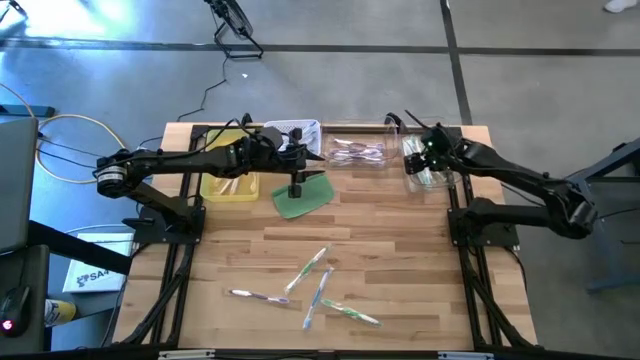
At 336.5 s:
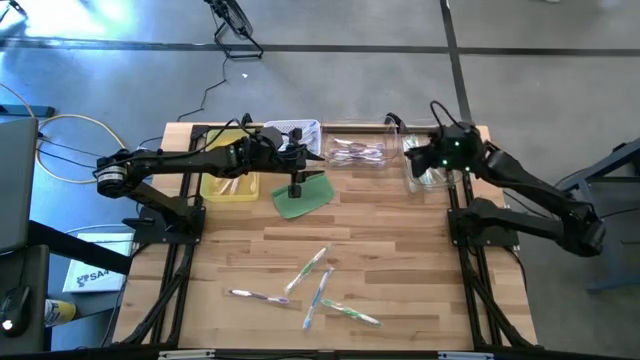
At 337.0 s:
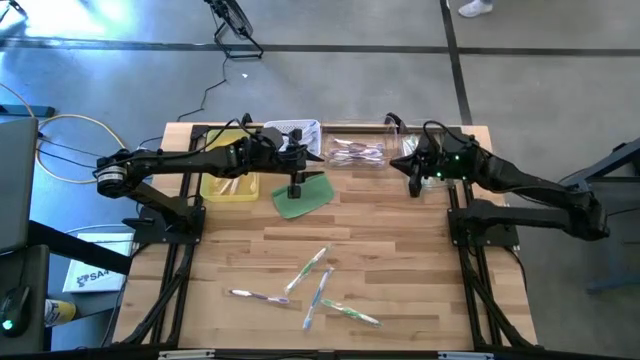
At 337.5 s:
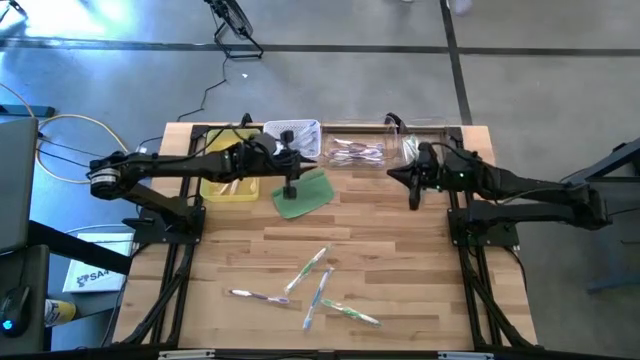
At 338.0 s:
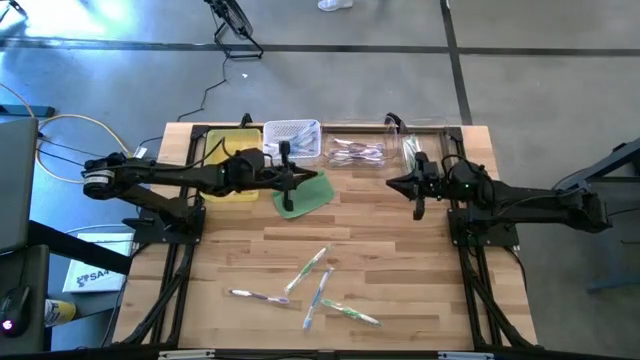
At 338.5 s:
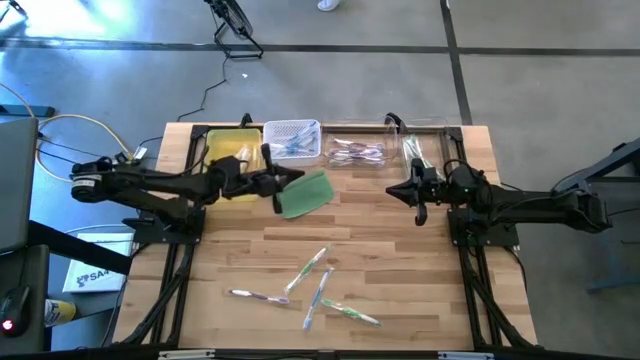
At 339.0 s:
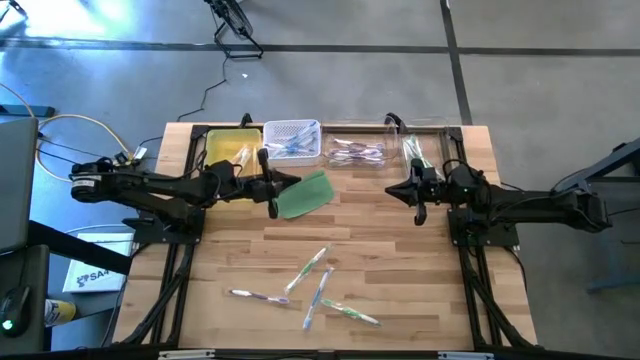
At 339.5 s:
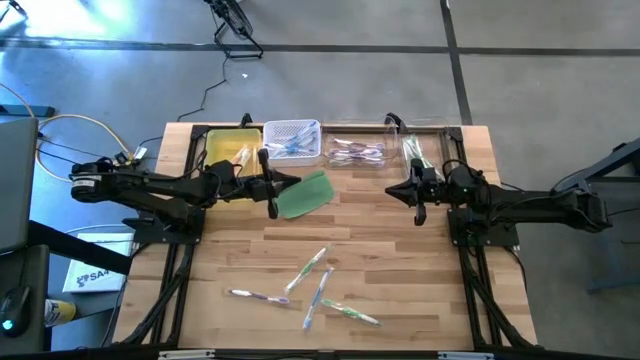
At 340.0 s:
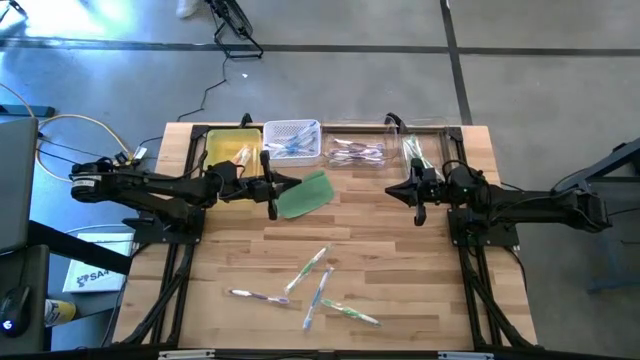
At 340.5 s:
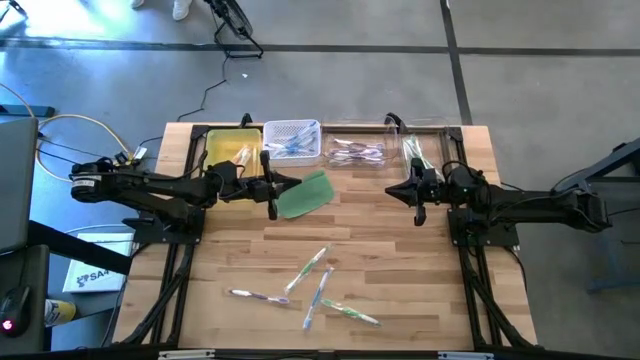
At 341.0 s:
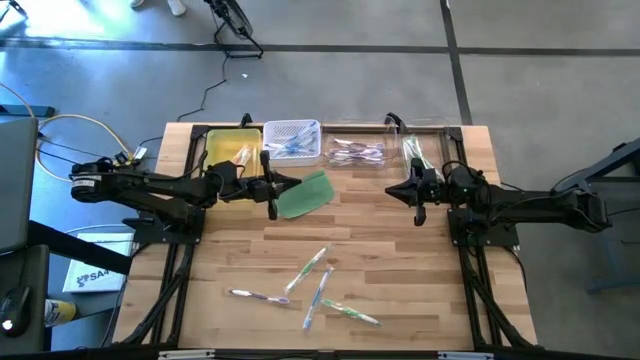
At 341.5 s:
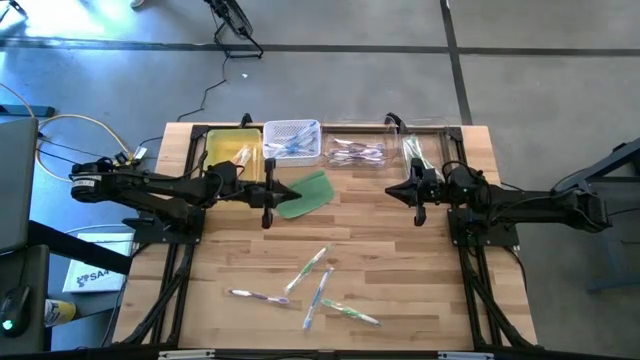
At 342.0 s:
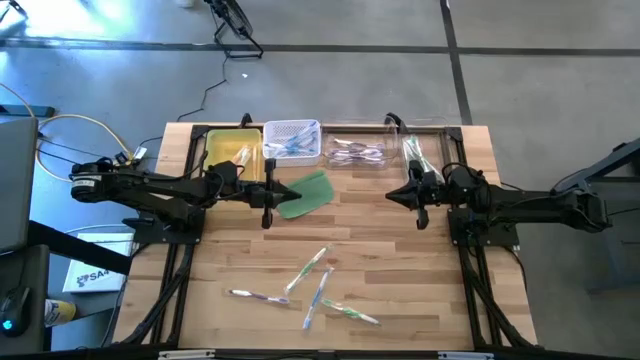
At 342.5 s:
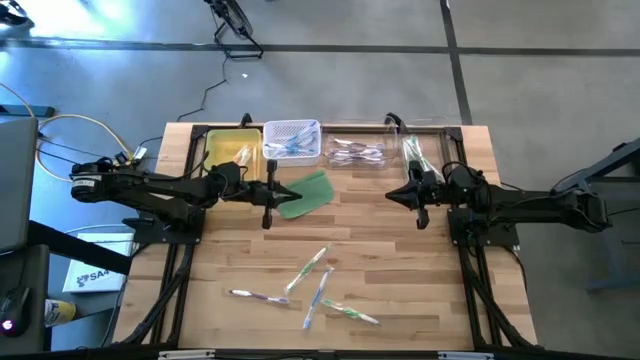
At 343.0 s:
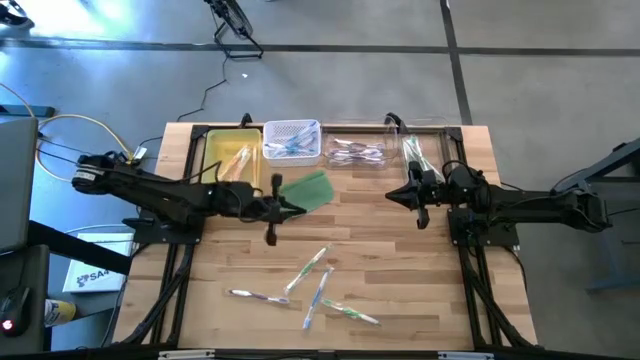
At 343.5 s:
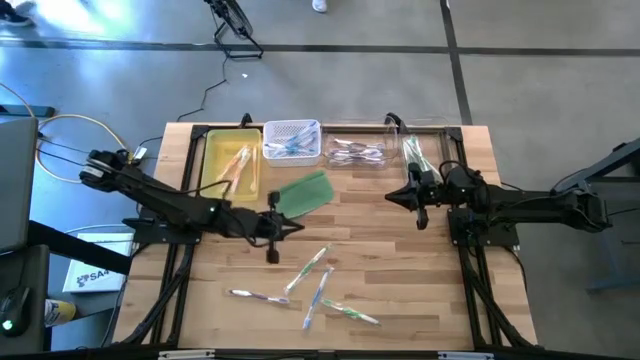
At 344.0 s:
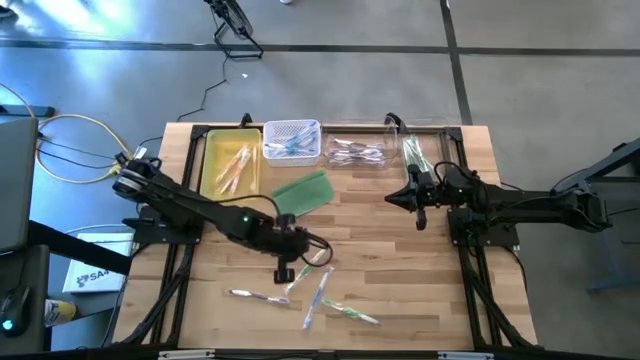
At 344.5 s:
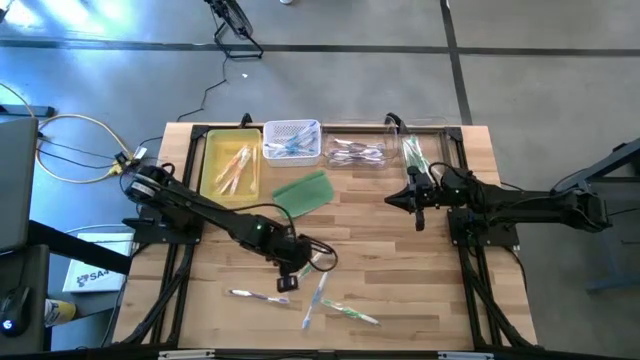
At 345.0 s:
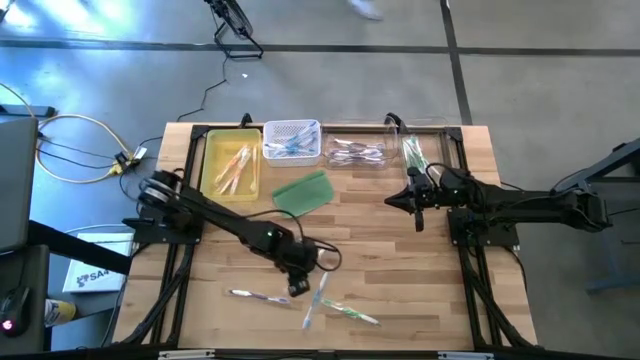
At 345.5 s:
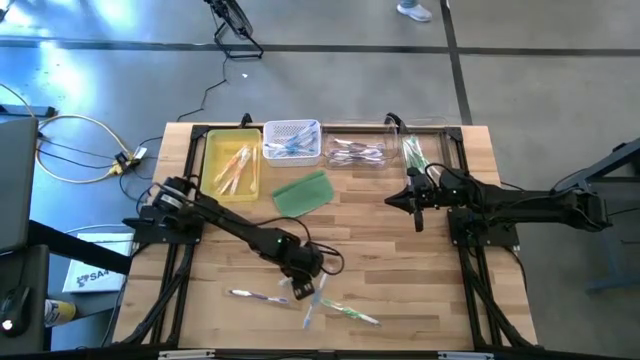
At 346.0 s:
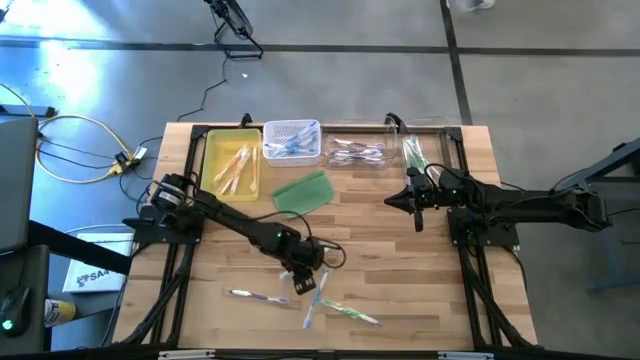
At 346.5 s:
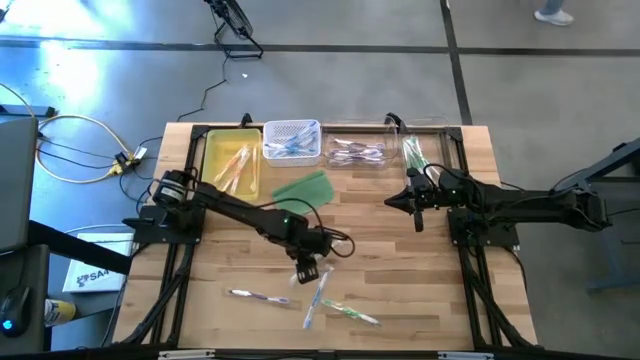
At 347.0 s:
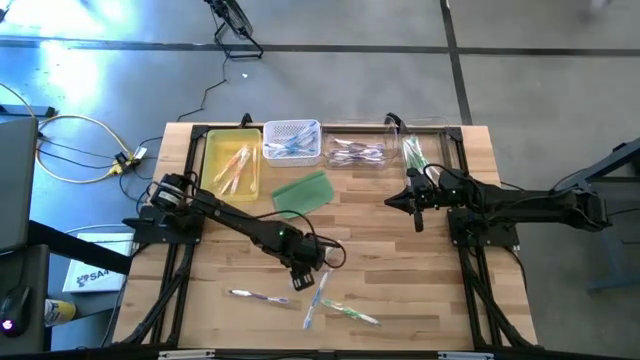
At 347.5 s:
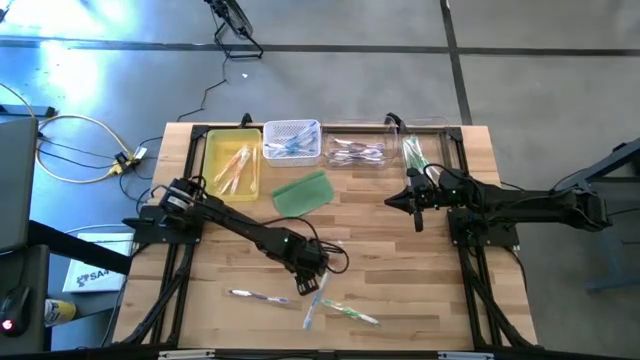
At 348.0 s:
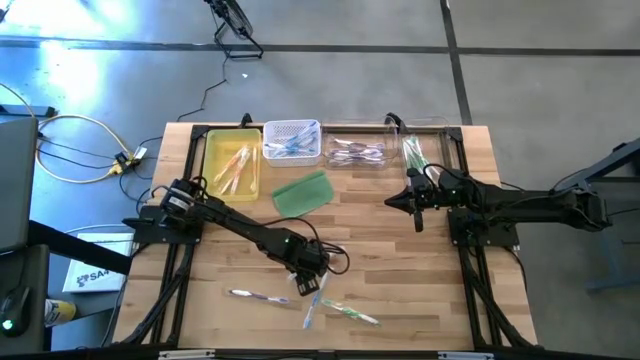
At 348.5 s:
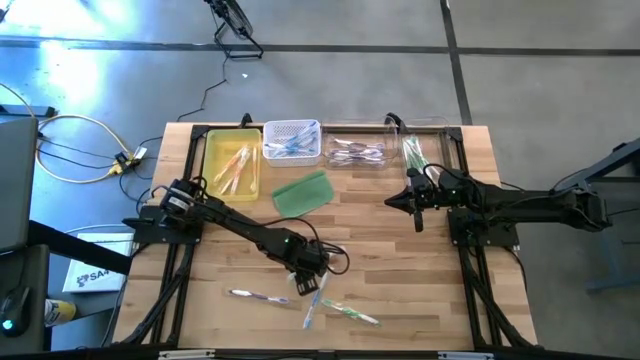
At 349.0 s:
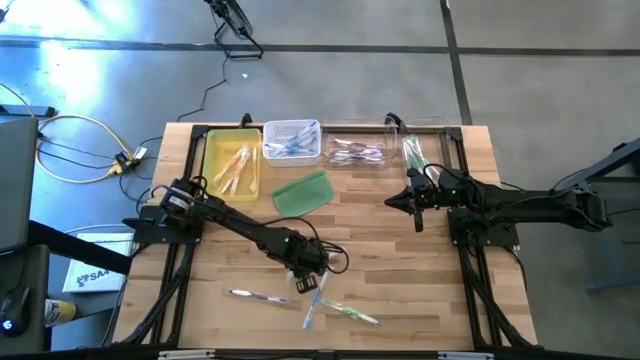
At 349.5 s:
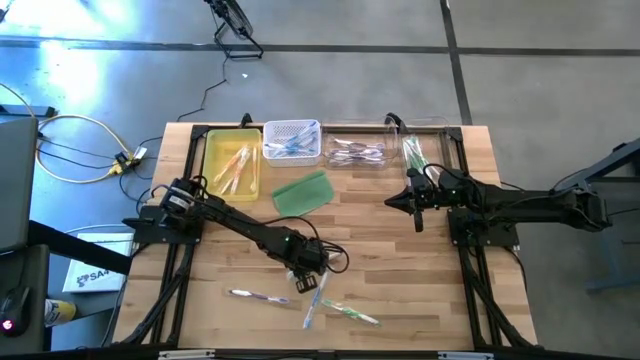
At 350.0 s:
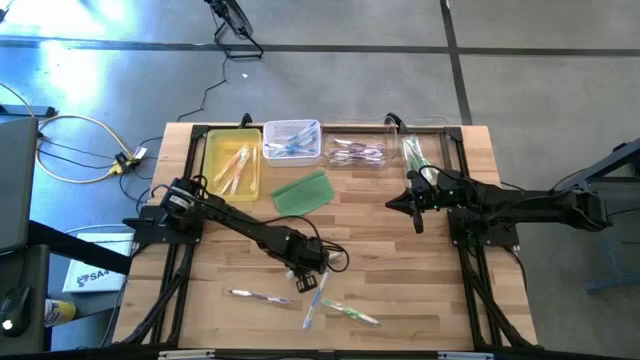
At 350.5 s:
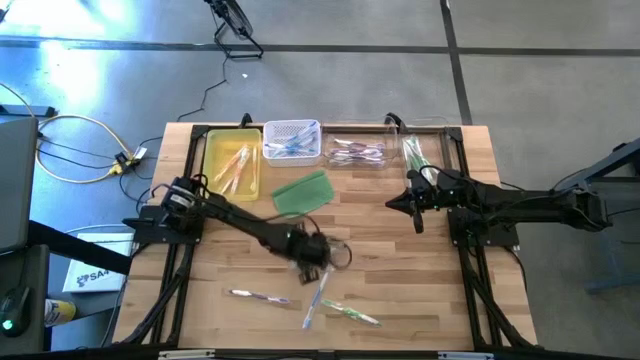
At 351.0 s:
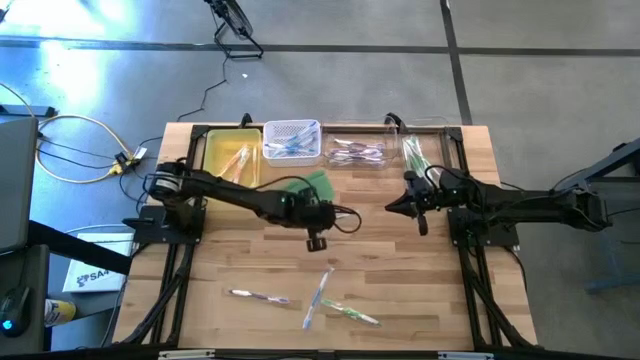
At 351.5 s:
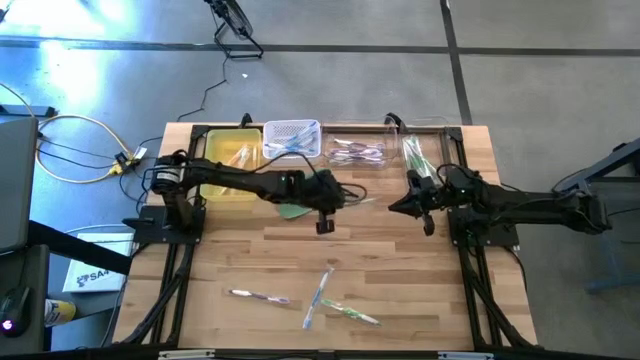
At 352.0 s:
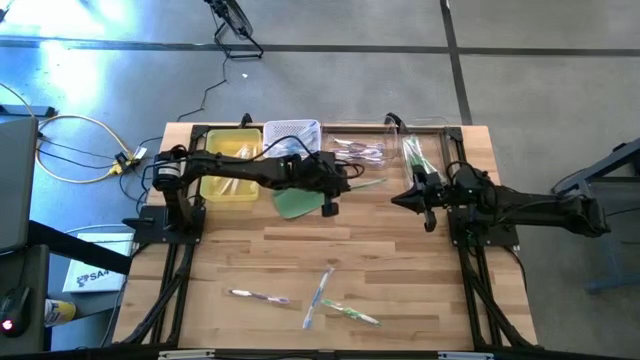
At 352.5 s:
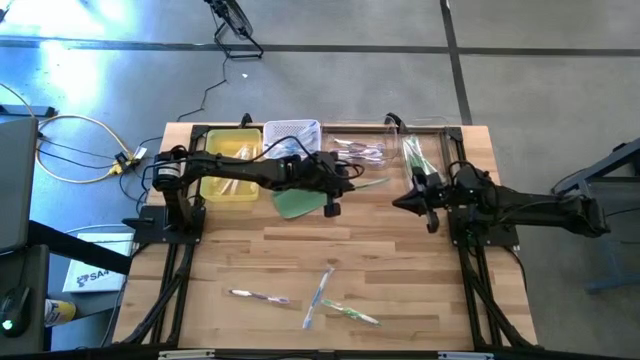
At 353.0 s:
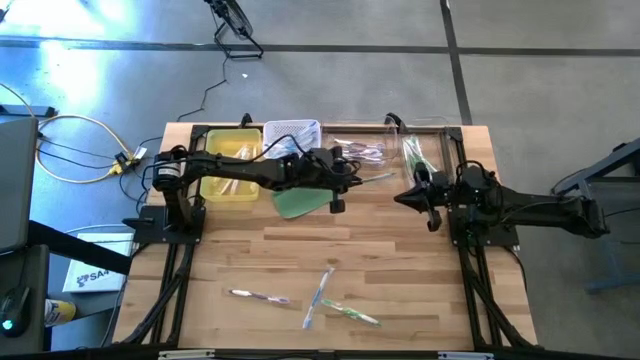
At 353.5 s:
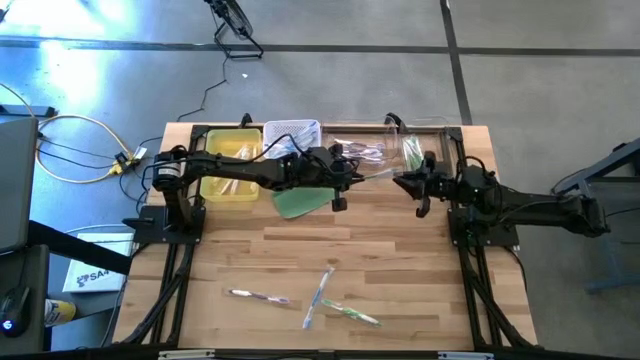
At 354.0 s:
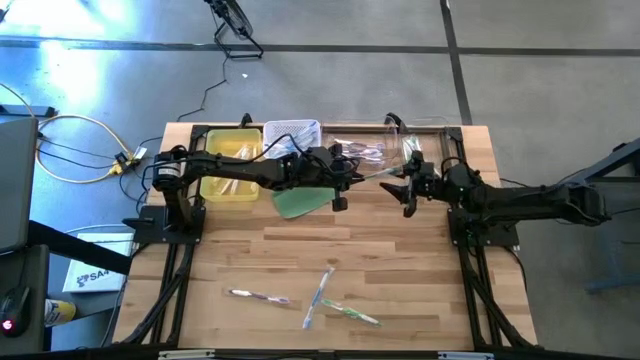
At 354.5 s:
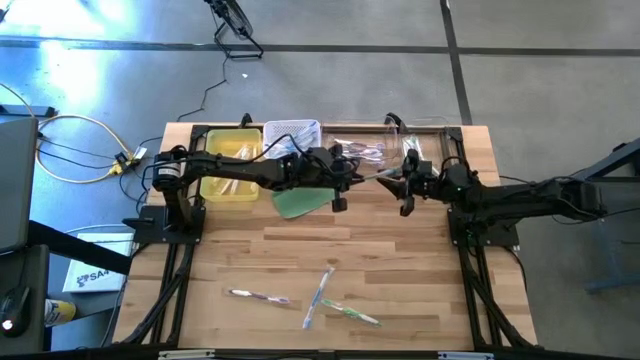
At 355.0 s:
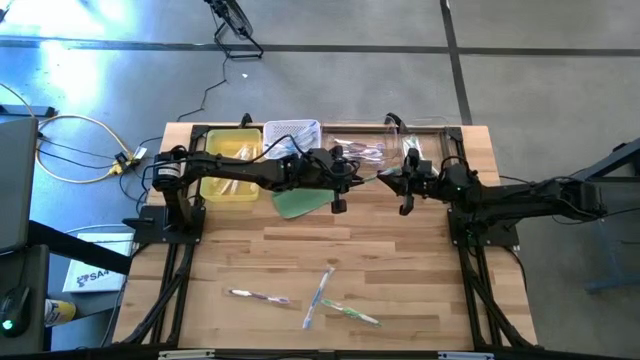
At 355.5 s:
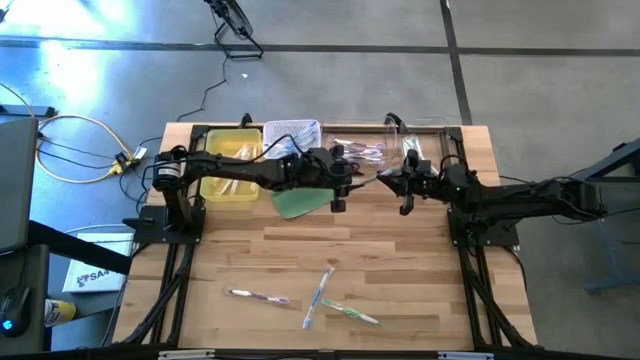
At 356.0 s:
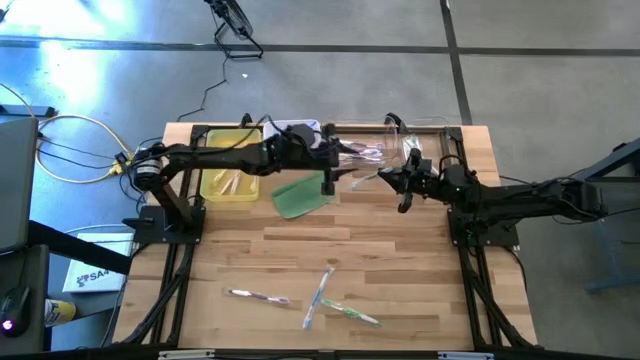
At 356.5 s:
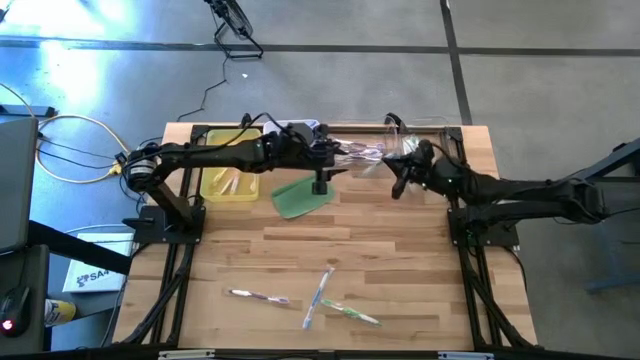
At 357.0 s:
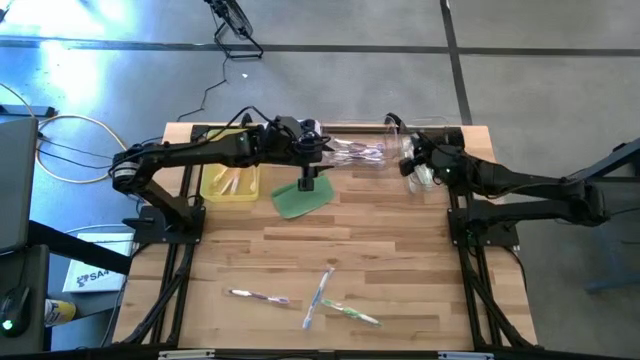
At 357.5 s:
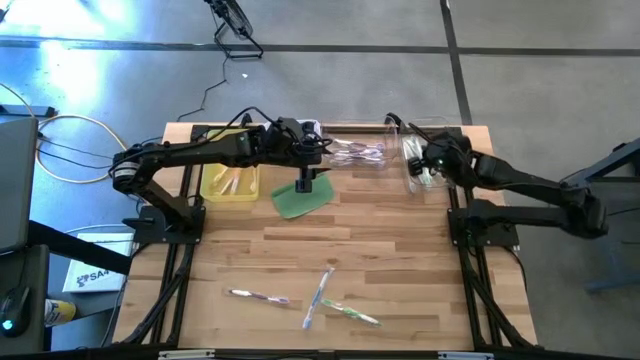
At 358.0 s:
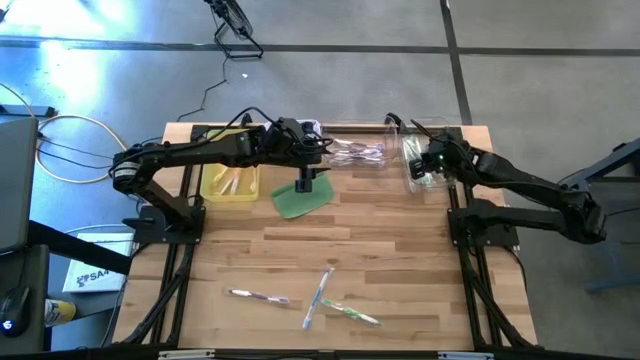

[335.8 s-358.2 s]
Task: Pick & Place Toothbrushes
Put the green toothbrush into the right transparent bin
